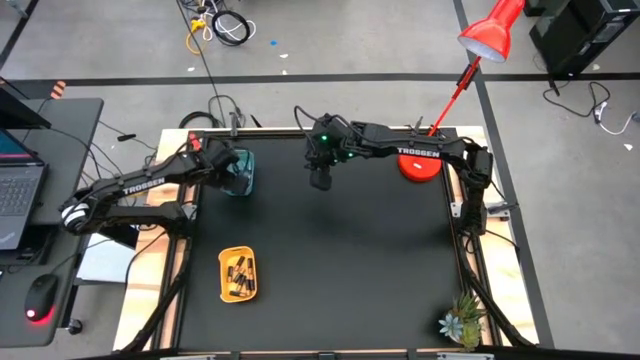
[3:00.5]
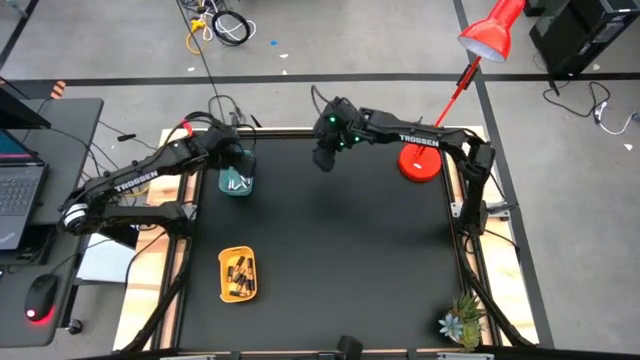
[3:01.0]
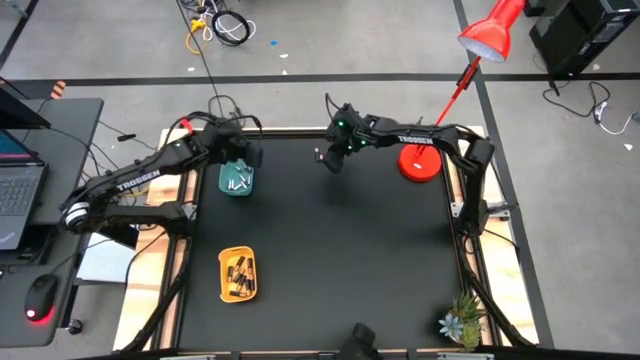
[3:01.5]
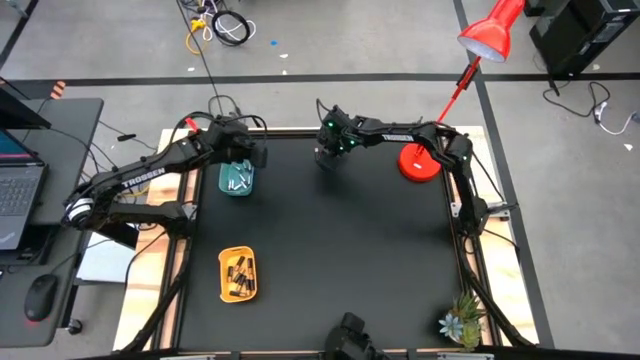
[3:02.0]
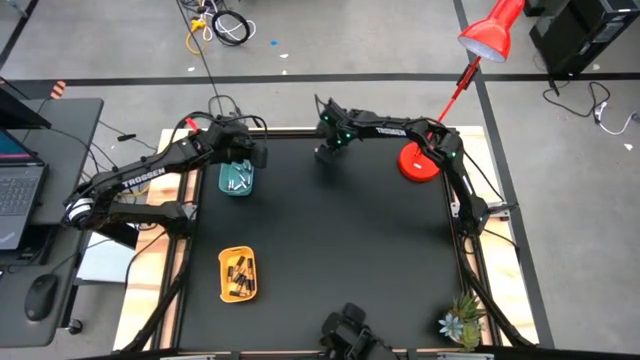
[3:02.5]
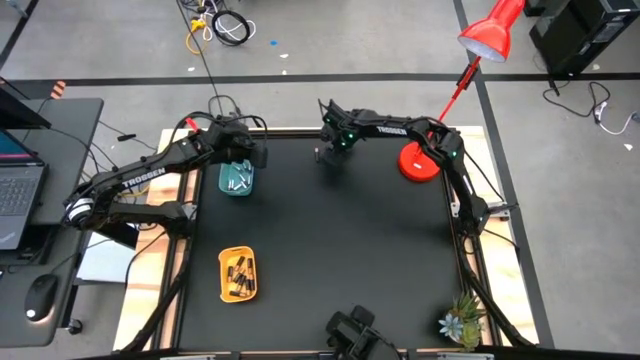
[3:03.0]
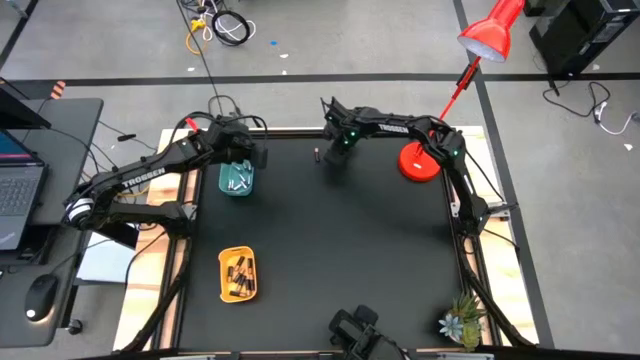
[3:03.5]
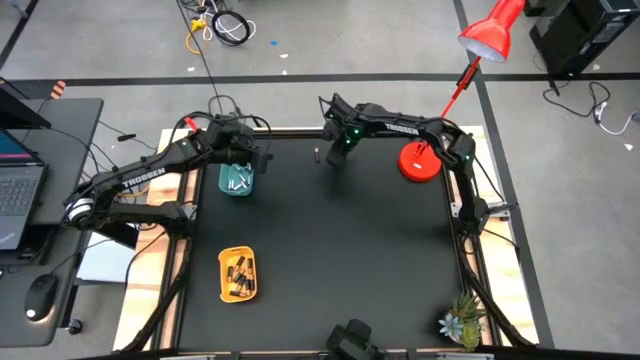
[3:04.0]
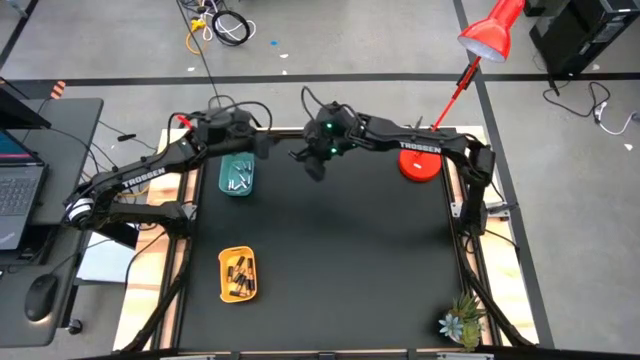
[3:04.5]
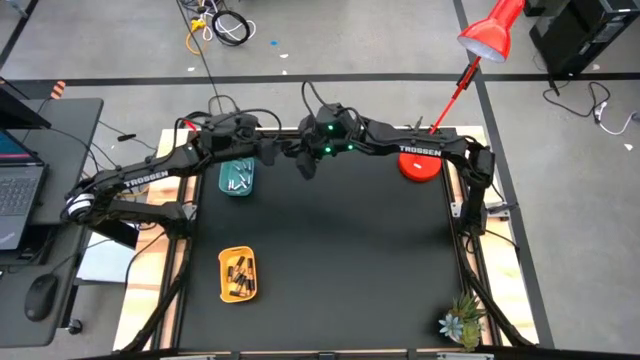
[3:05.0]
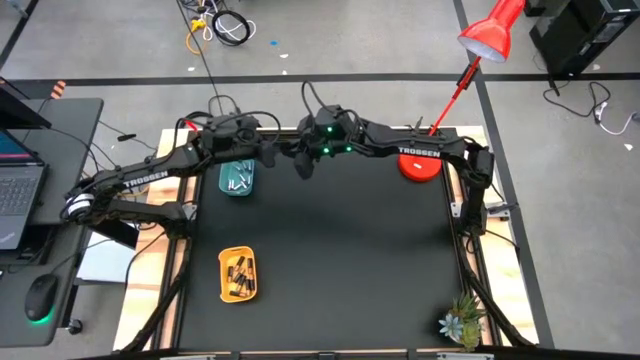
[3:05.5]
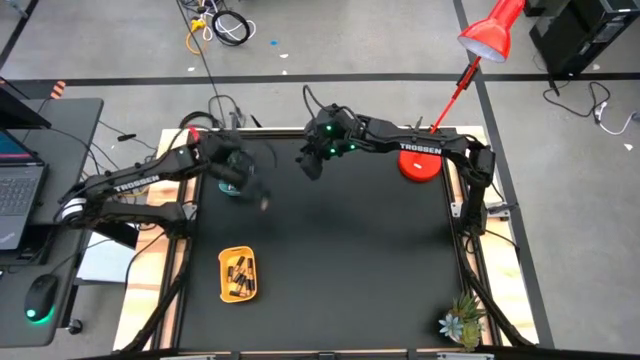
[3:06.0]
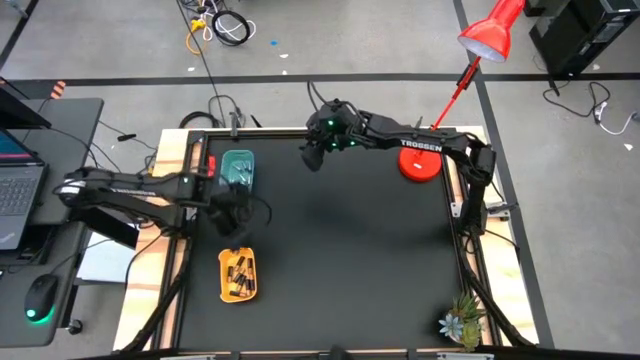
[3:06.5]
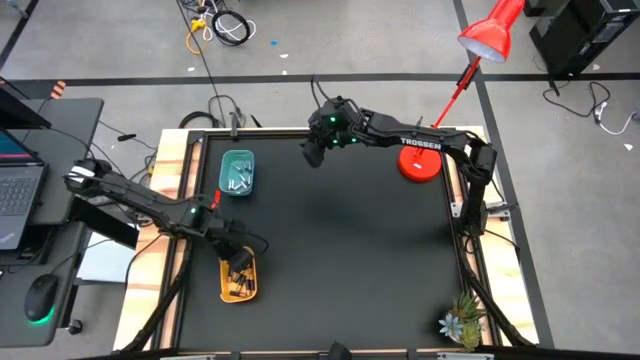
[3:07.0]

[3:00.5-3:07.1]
Task: Sort batteries
Put the black and yellow battery into the yellow bin

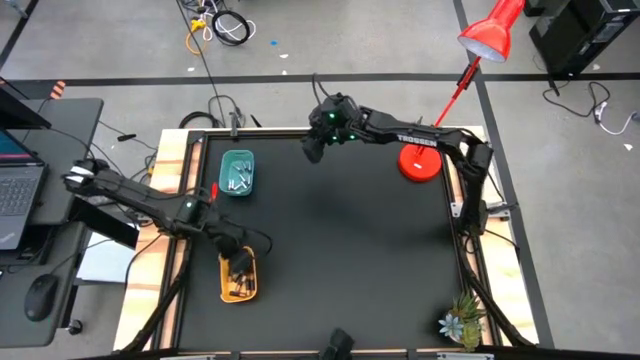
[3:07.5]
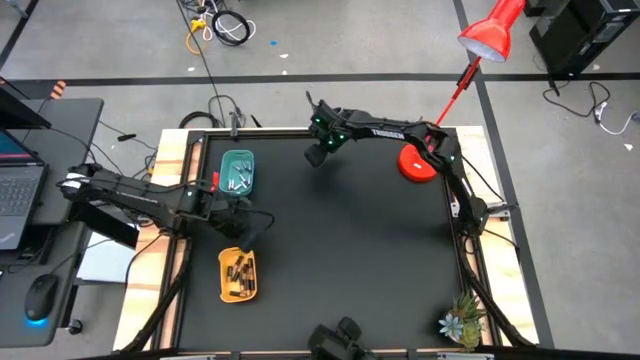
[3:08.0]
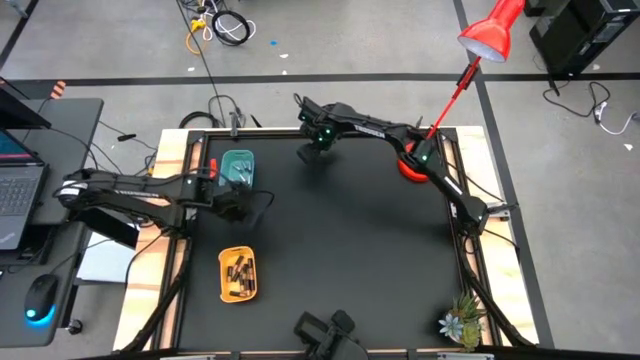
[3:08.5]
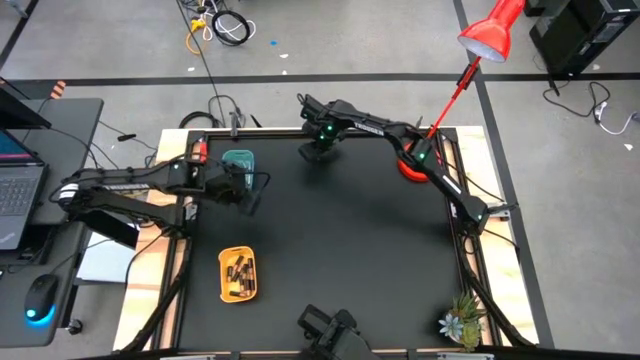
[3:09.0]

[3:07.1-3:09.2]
Put the black and yellow battery into the yellow bin

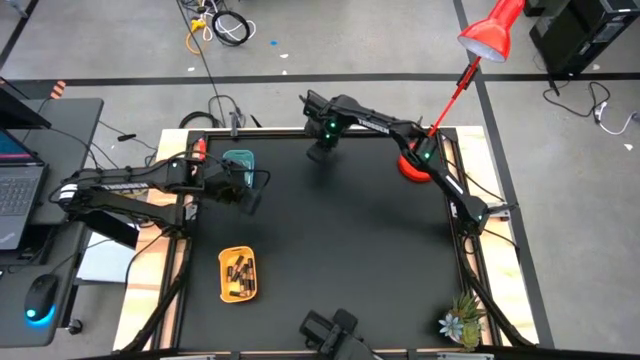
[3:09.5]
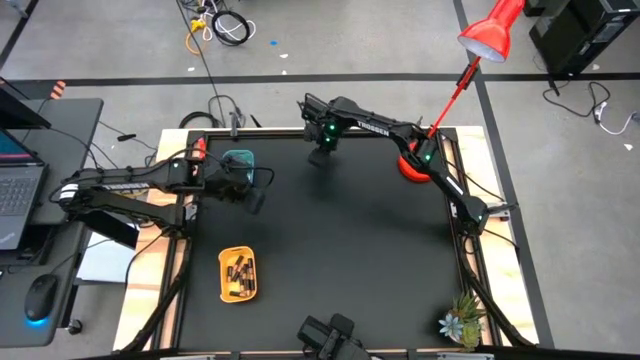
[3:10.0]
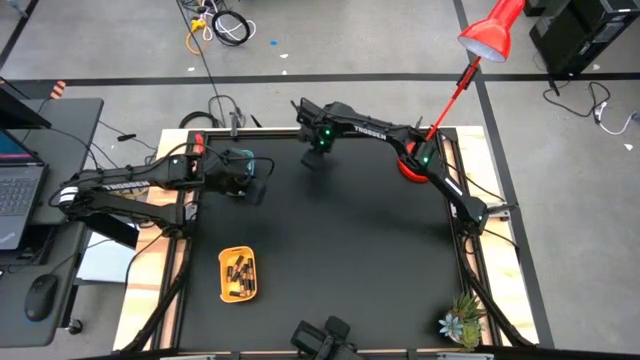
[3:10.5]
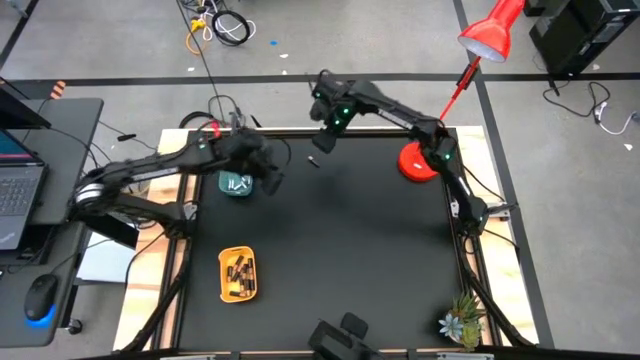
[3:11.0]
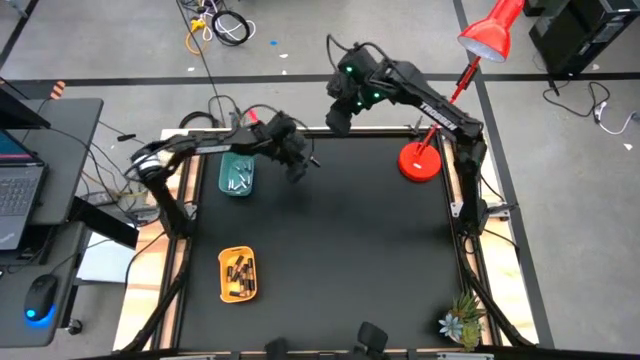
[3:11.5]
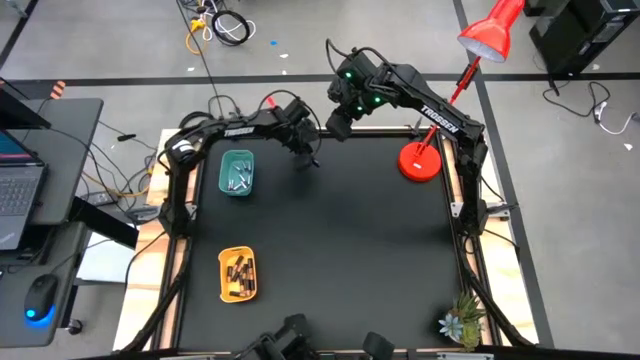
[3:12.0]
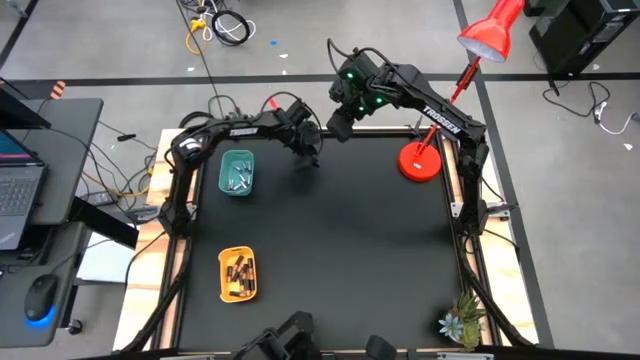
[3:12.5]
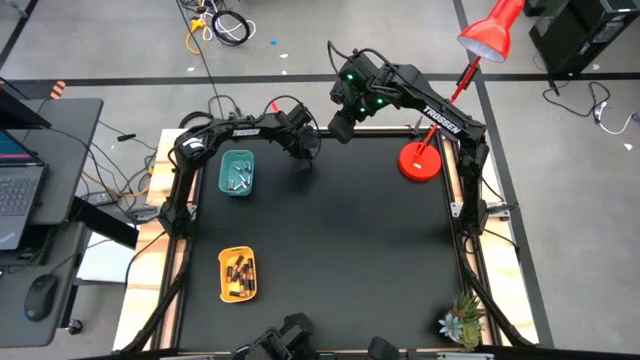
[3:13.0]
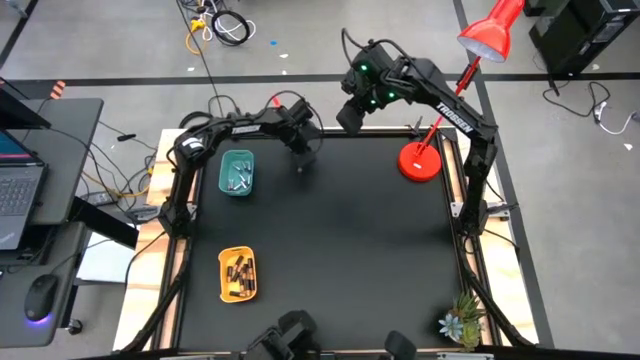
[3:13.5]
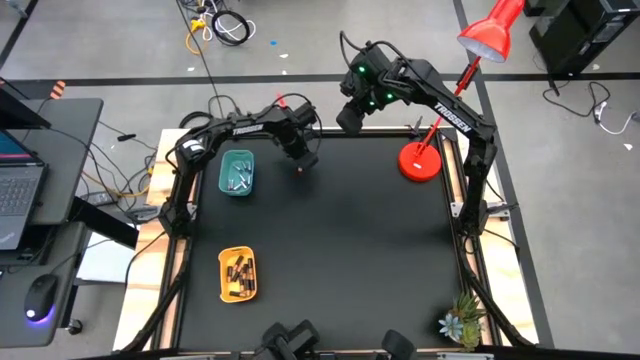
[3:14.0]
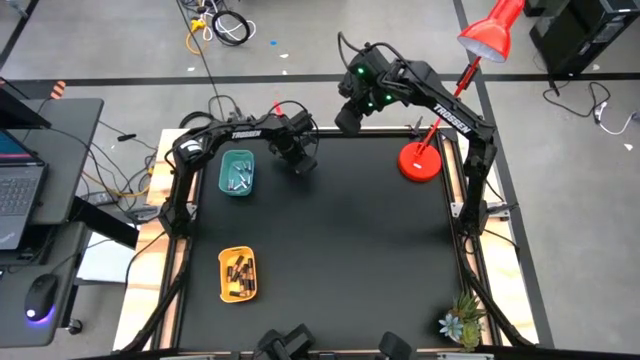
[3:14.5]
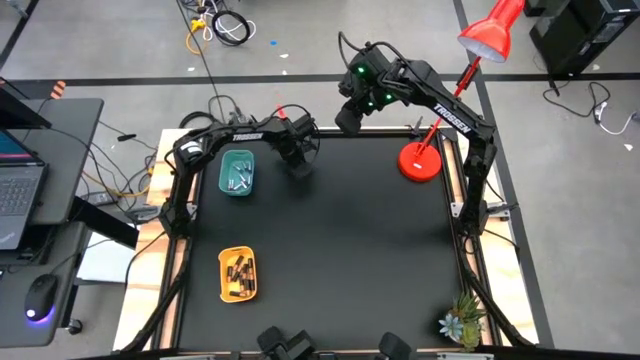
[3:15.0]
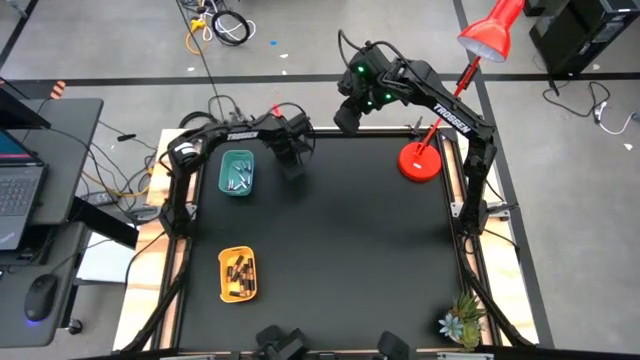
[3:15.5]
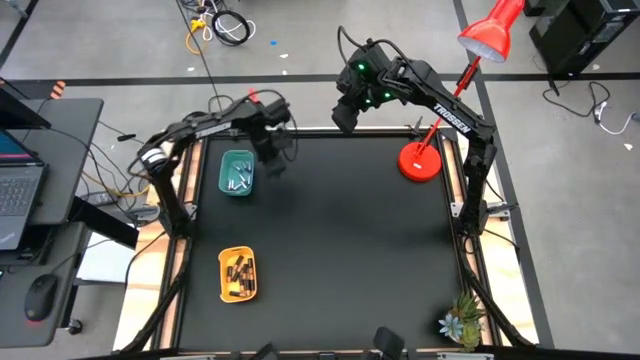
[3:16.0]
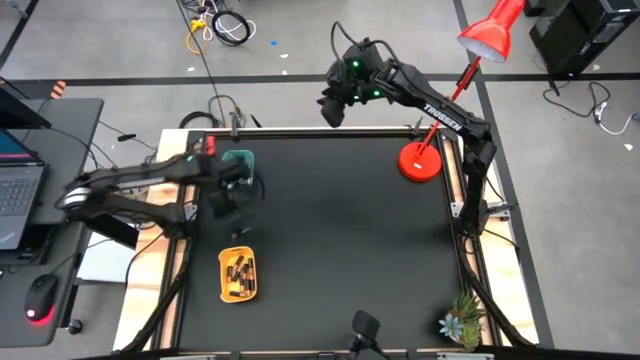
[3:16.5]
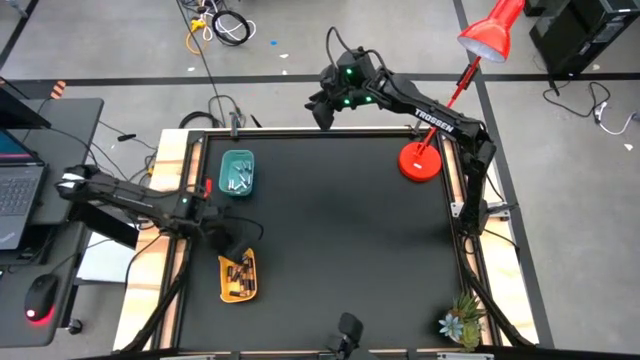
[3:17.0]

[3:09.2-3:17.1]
Put the black and yellow battery into the yellow bin

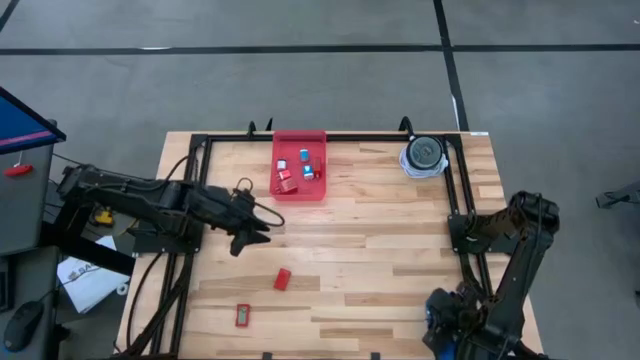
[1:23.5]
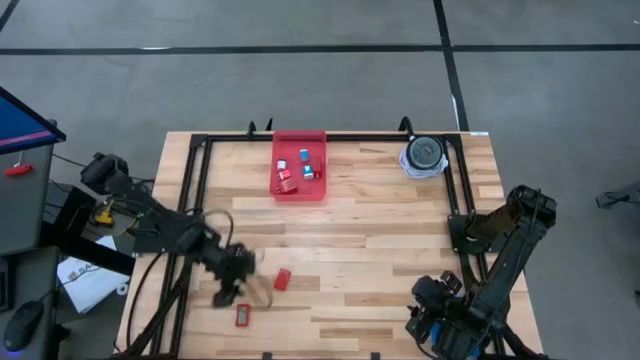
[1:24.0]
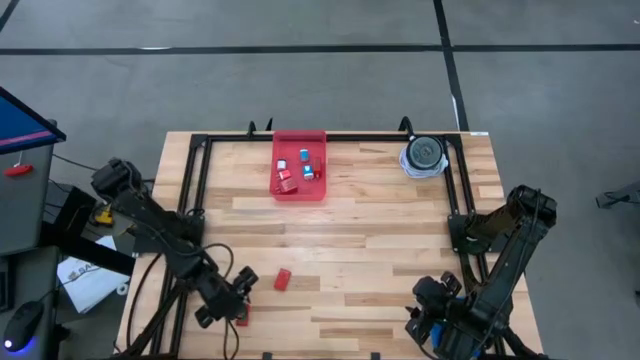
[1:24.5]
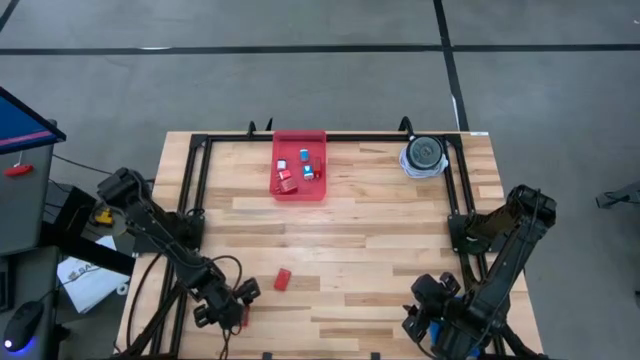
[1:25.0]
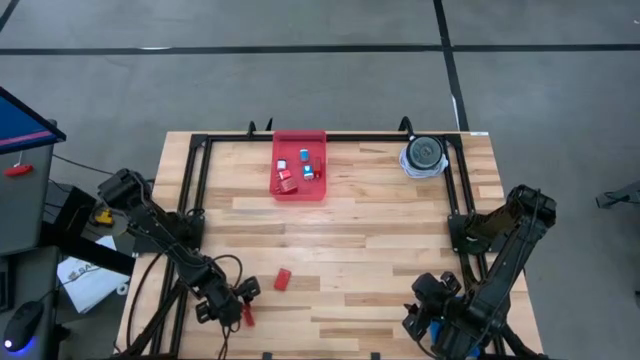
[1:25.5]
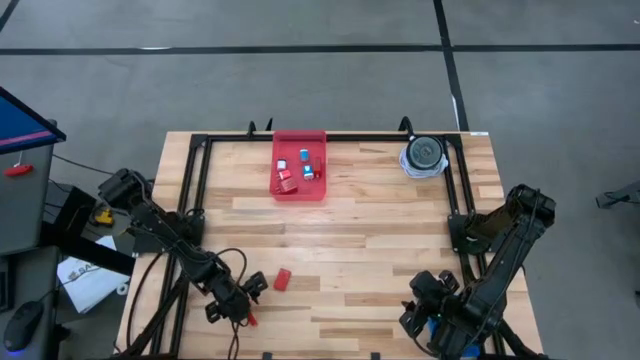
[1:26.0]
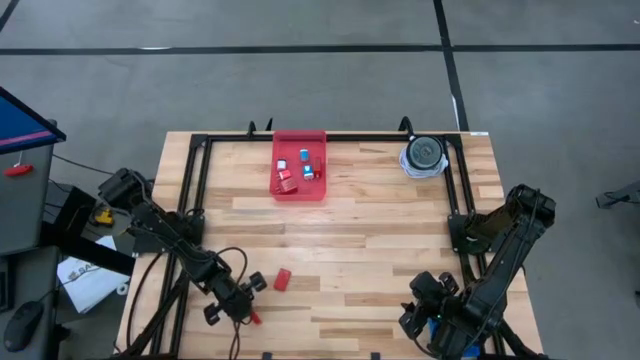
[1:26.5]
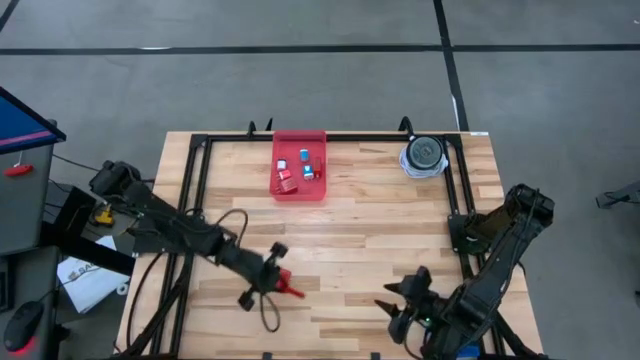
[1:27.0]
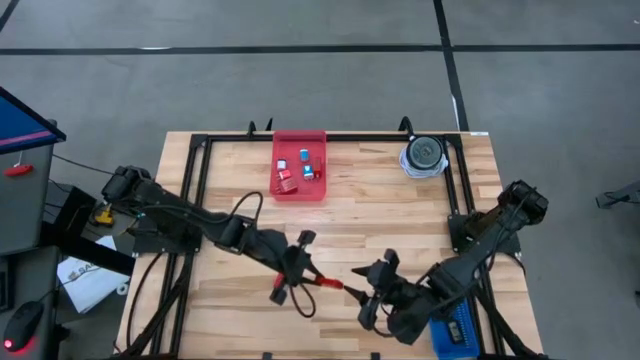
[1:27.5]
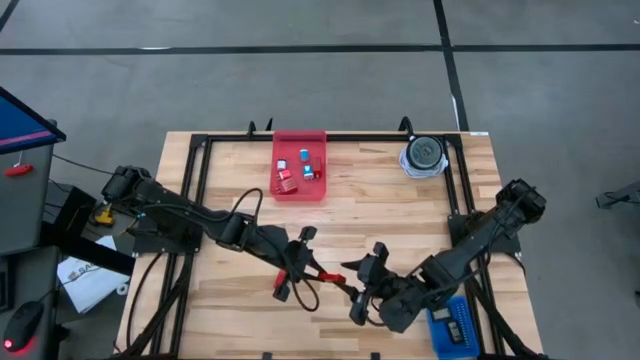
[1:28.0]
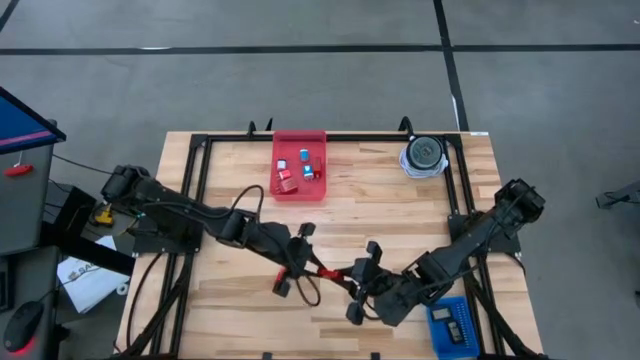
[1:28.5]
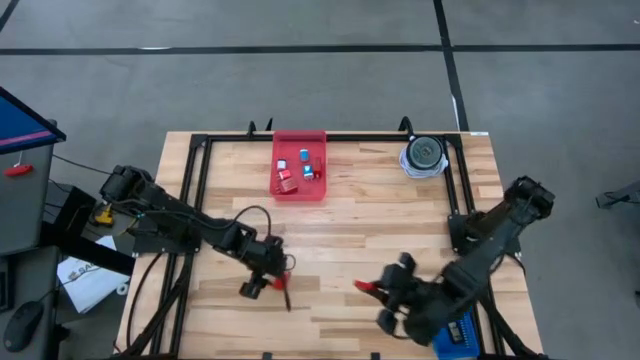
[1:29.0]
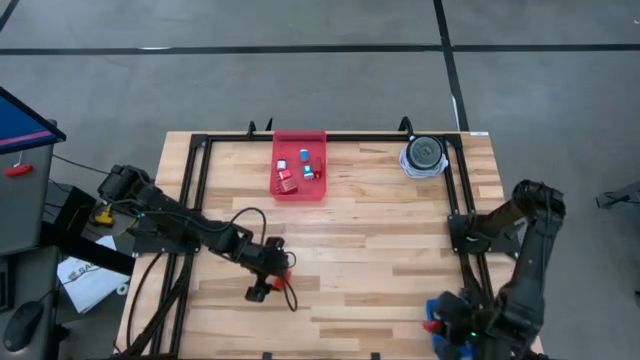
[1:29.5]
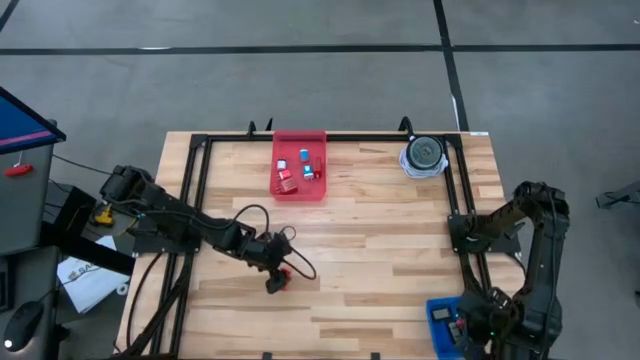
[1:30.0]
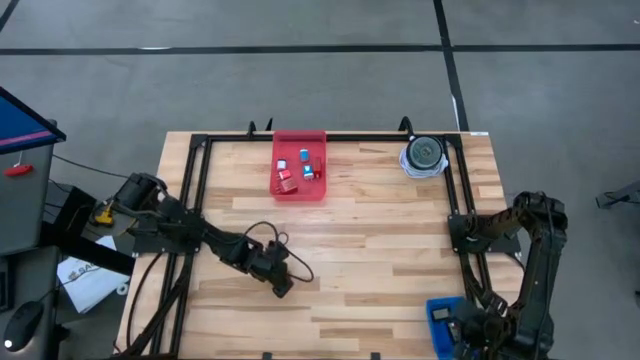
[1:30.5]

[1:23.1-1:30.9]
Task: Pick & Place Office items
Put the bottom red digital timer into the blue bin
